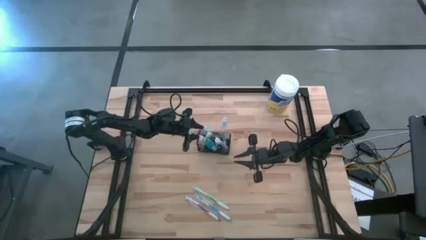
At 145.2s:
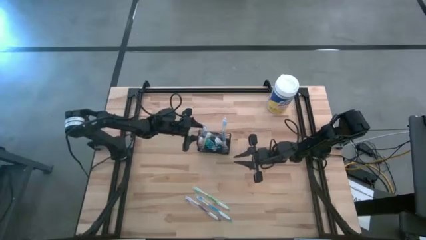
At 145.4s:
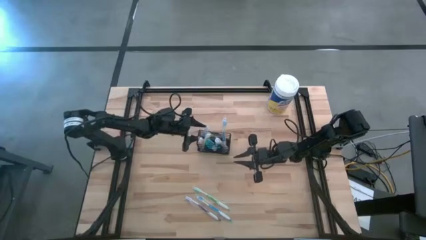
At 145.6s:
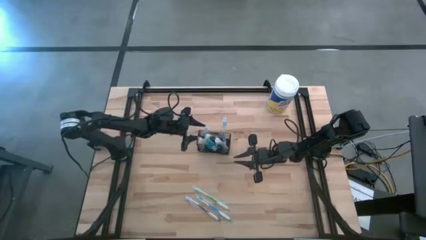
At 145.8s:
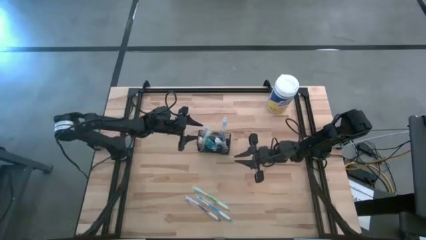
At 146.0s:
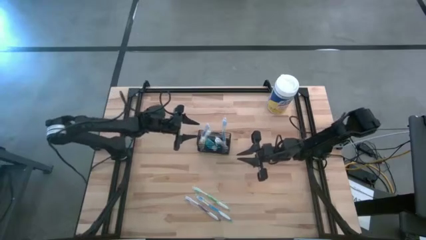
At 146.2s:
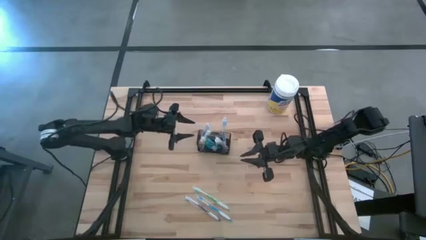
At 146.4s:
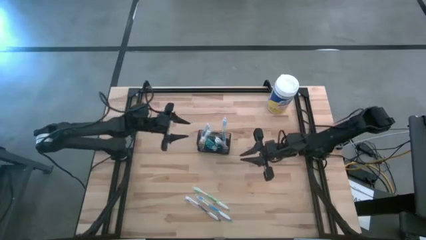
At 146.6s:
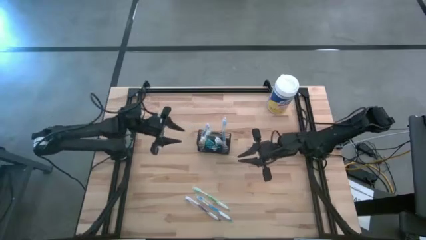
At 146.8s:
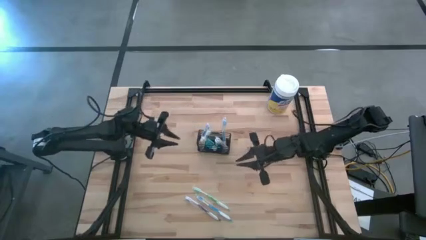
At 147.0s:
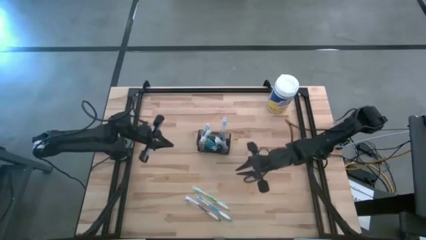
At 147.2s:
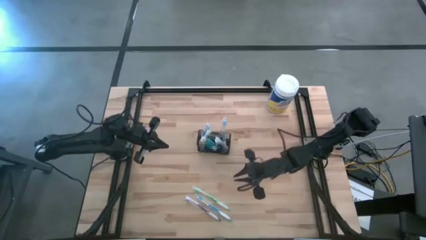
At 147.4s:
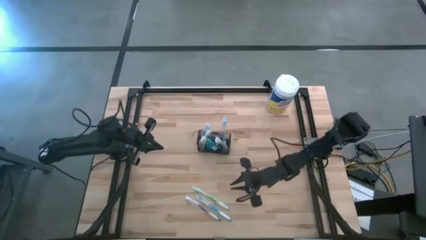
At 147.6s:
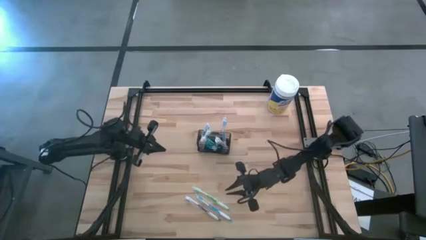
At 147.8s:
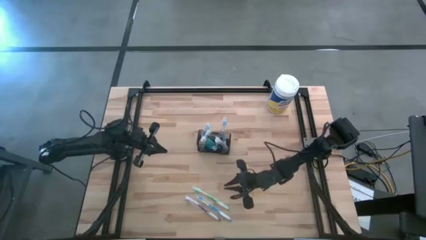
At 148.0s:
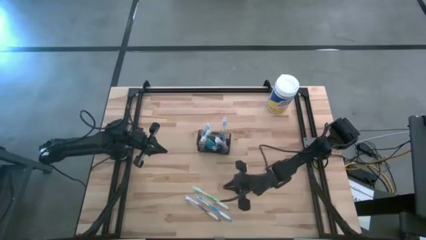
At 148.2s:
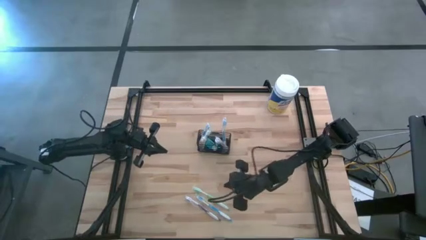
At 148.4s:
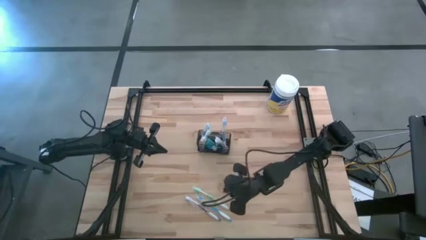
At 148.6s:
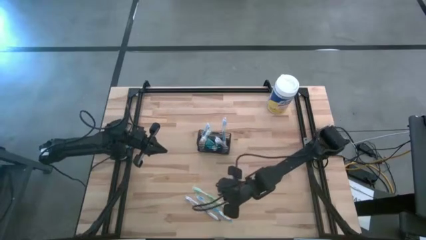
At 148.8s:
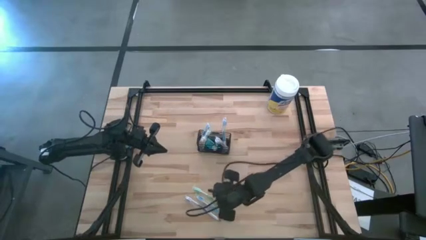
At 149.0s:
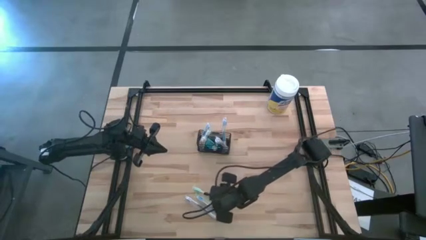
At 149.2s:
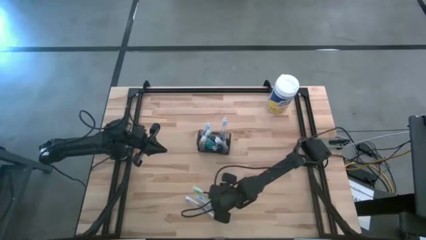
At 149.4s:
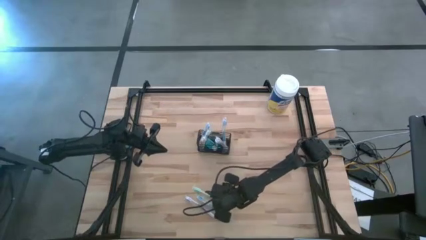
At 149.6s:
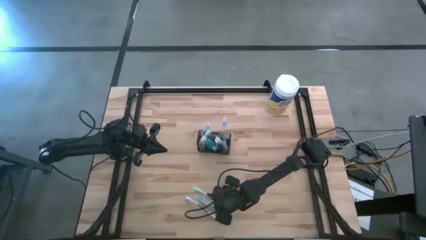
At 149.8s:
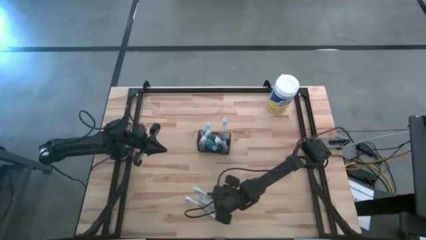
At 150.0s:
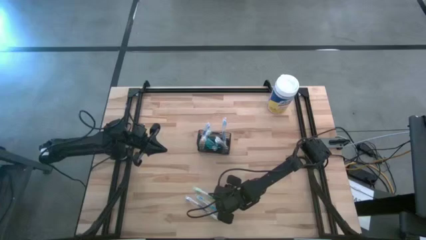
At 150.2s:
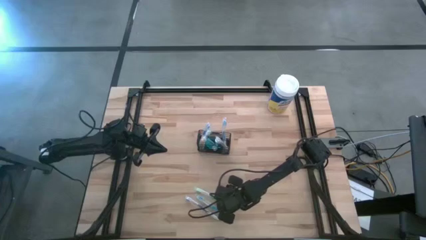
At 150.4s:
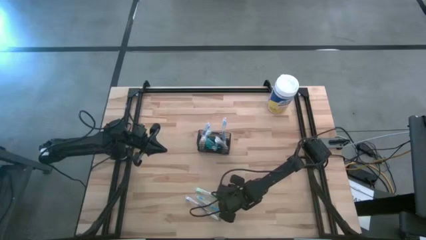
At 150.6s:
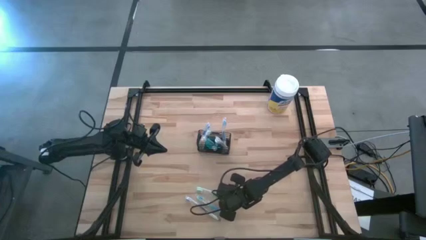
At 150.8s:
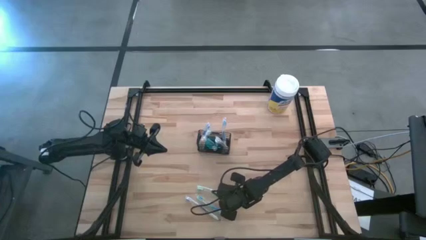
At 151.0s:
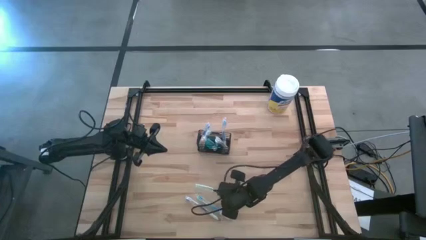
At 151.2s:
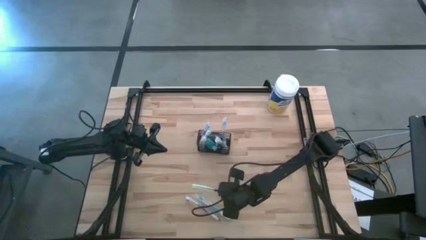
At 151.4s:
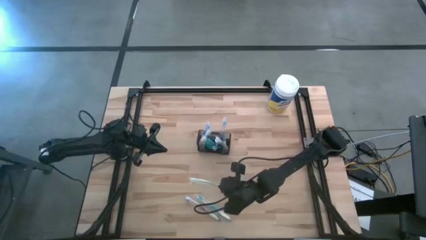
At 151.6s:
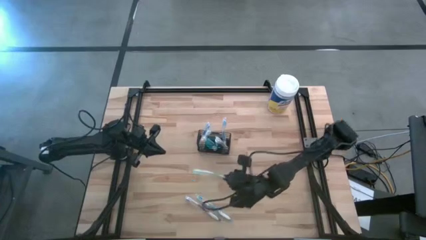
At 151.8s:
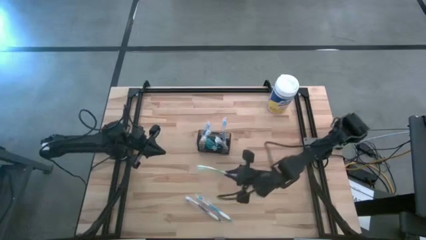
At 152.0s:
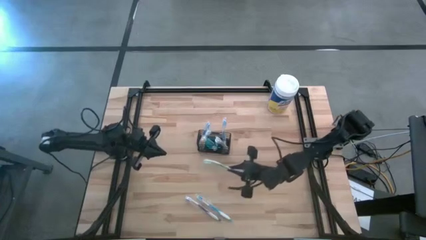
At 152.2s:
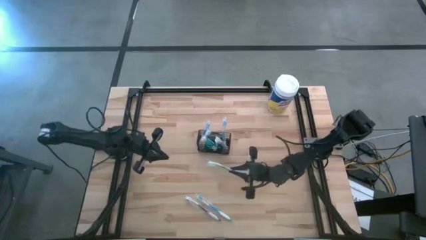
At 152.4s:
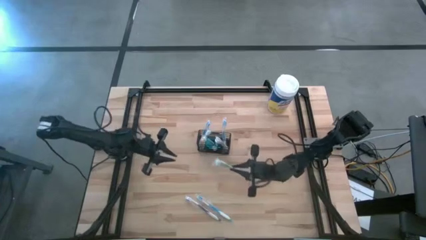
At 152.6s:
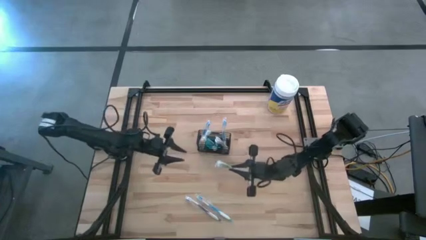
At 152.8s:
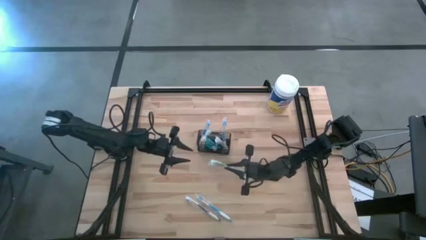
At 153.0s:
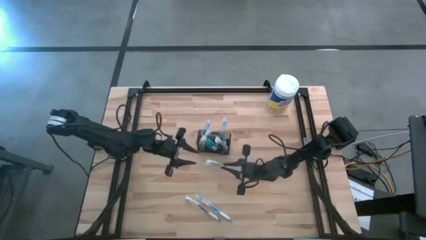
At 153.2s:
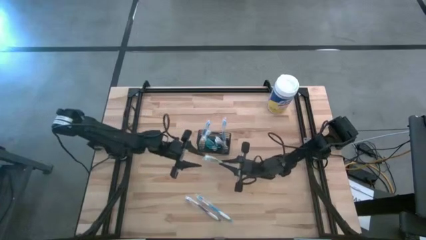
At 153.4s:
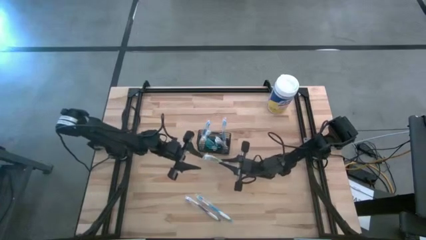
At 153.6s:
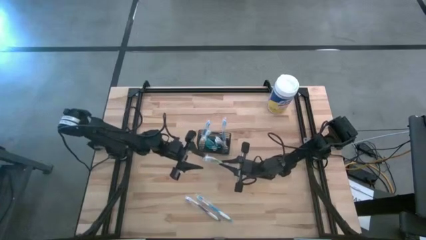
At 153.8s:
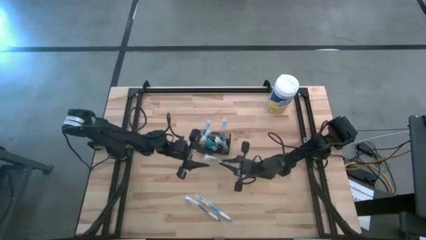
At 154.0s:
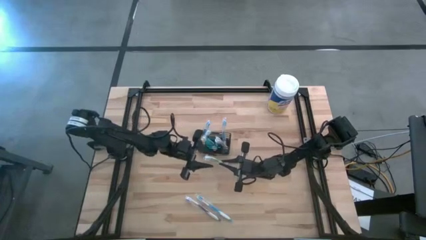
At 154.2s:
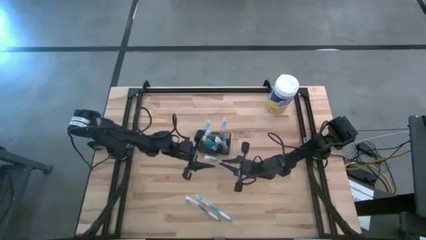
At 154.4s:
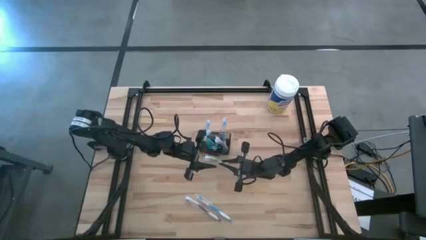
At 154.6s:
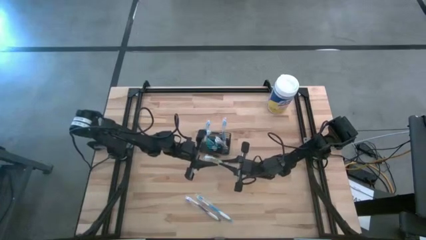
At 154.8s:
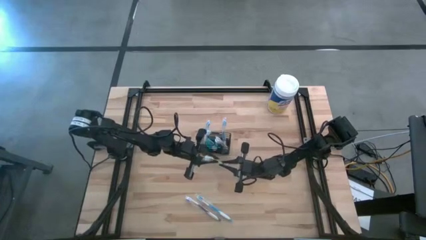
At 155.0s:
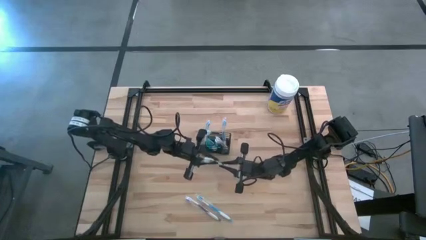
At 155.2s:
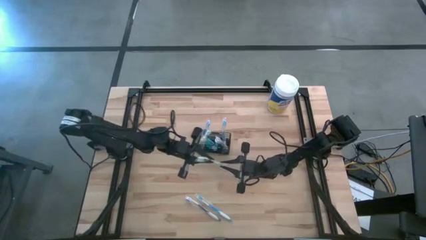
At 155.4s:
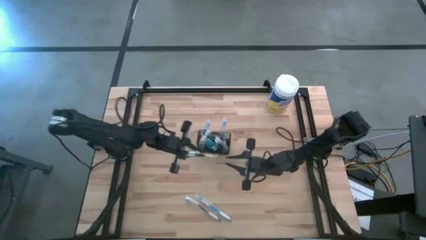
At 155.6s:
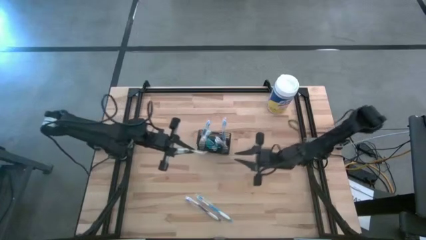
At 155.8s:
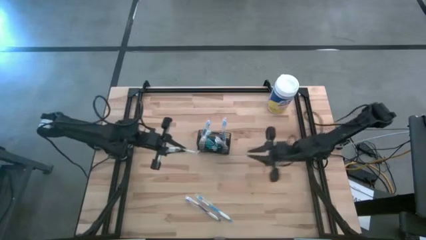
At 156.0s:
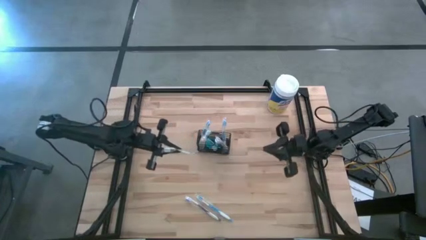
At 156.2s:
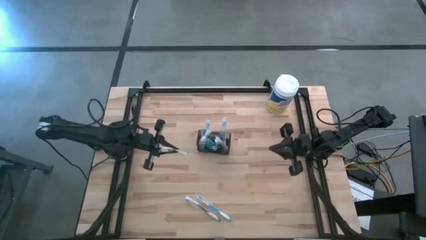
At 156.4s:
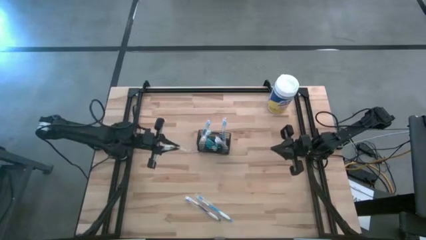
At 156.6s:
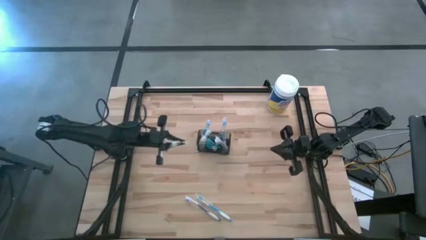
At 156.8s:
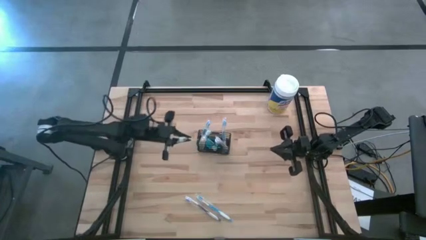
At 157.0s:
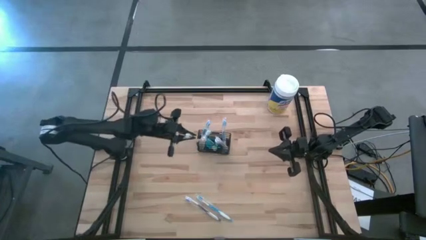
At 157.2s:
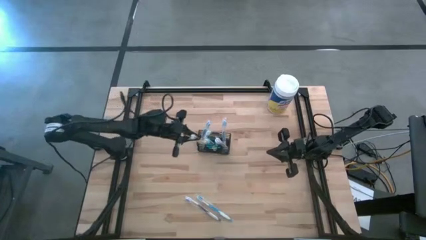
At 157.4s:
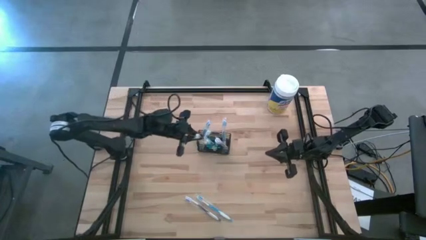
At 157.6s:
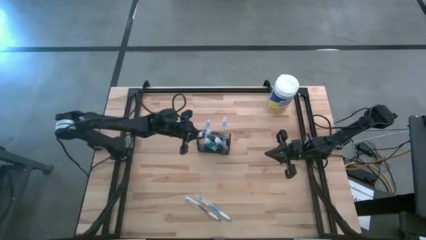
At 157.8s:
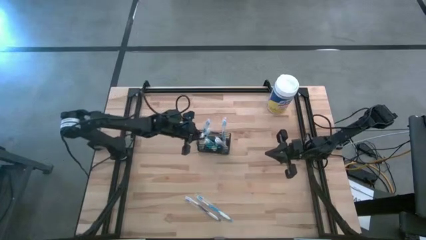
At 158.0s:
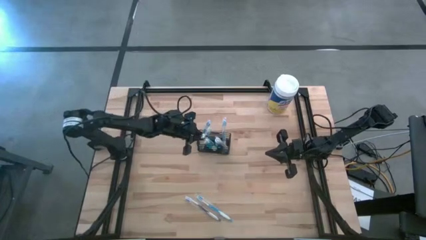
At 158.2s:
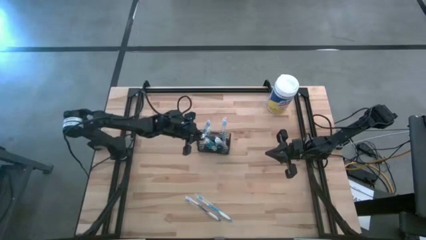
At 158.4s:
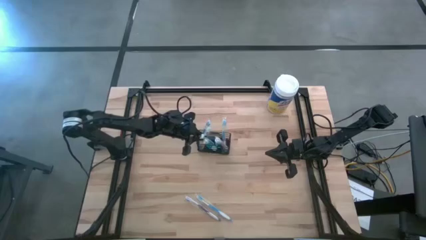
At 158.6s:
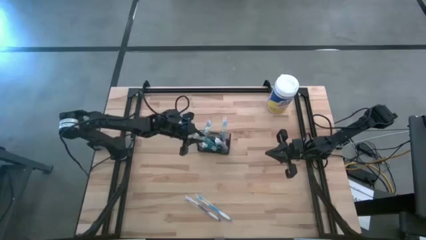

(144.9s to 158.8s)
Task: Pick & Place toothbrushing station
Put the green toothbrush into the black wire organizer

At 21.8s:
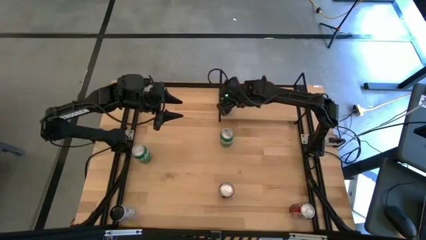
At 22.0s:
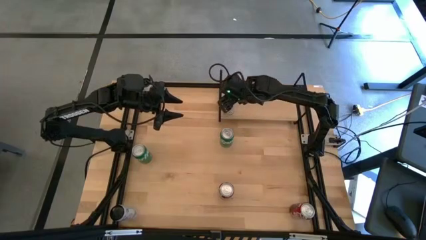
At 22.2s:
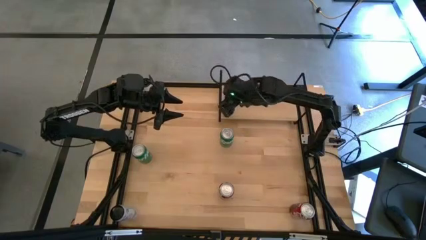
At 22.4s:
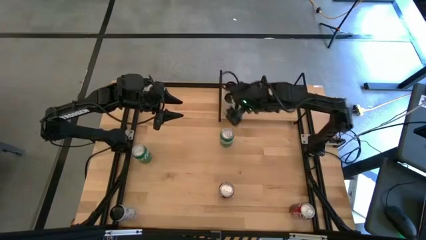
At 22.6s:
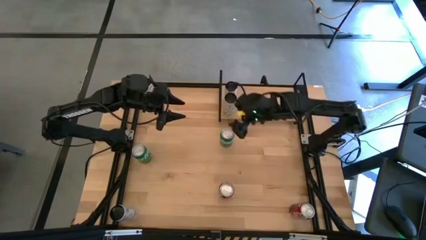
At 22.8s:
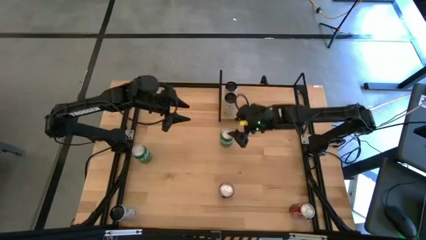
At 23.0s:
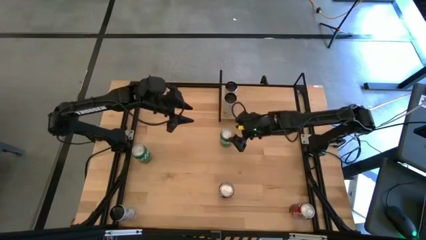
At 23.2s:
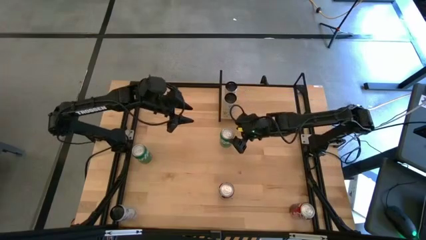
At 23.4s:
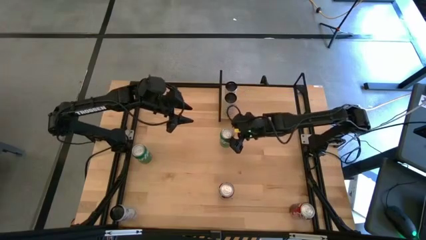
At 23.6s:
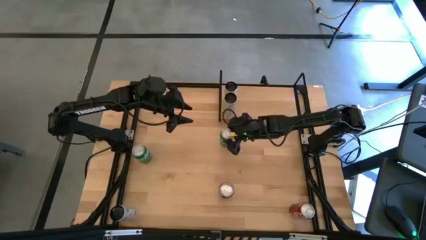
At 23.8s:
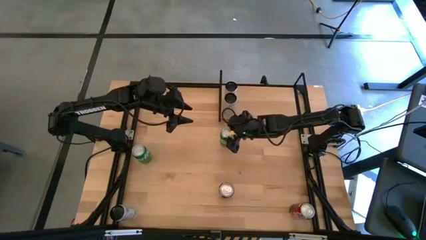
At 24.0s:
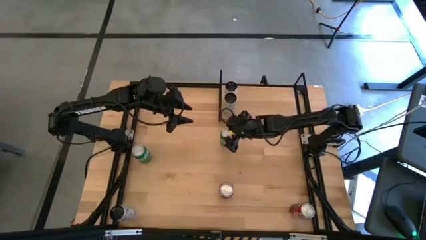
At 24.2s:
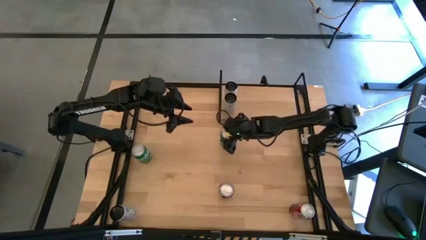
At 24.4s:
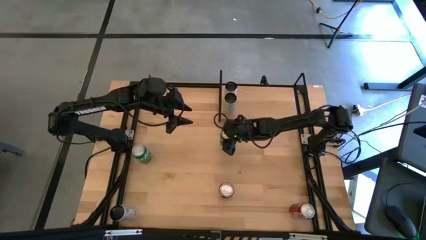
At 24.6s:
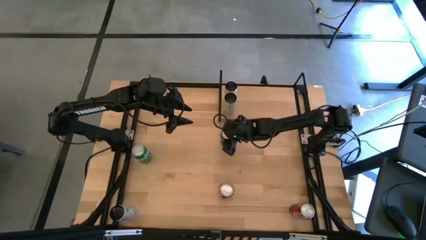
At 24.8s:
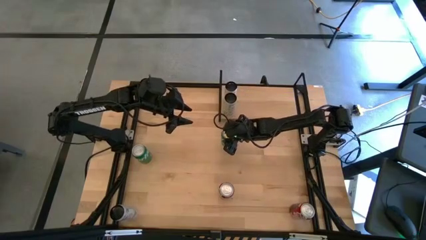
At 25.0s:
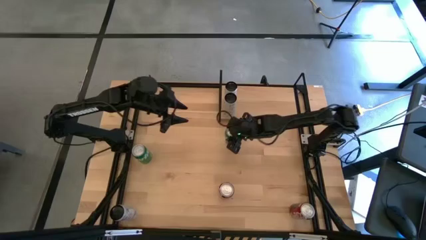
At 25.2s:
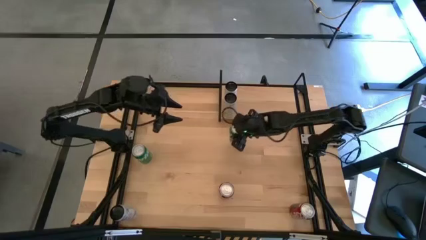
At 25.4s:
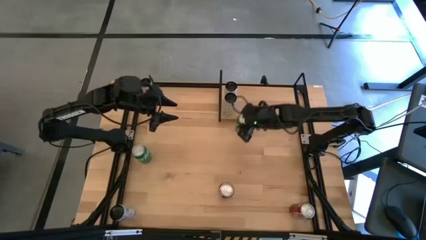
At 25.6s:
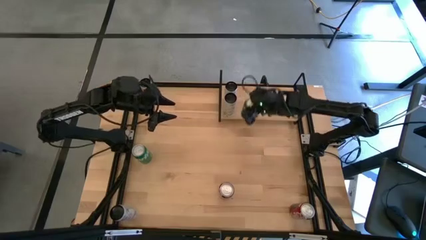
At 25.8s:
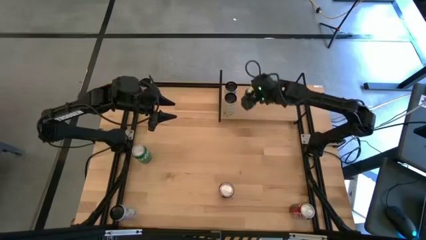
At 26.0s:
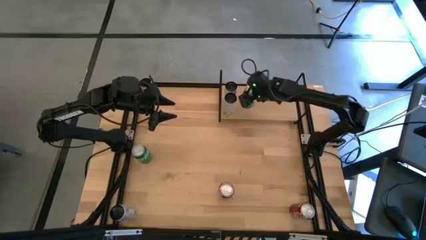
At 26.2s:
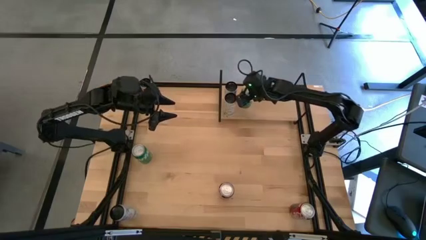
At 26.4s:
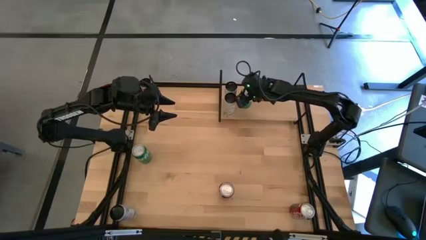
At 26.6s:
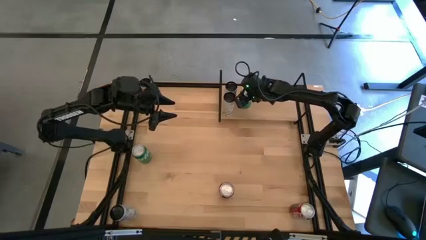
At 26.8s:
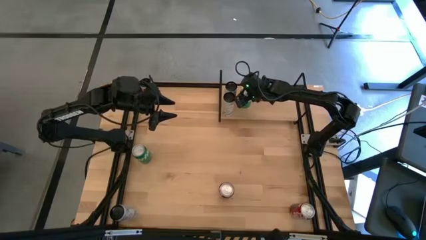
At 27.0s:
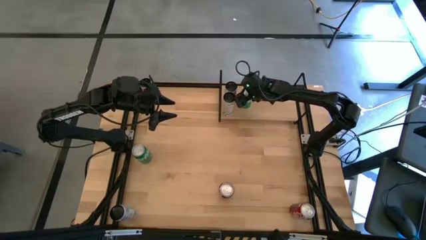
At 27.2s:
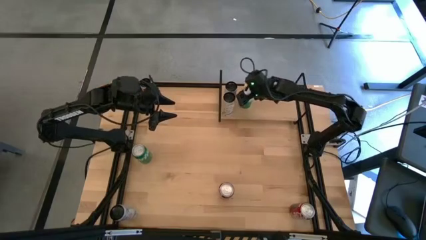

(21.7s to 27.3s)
Task: Place canned beverage on shelf
Put the top green soda can on the shelf
